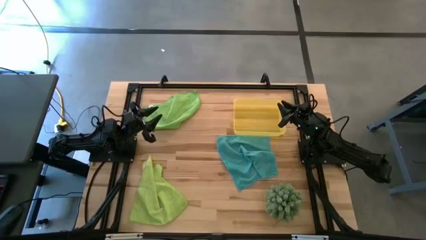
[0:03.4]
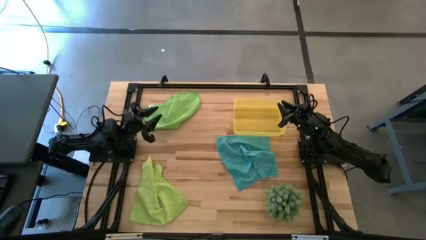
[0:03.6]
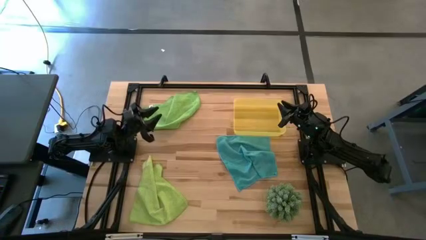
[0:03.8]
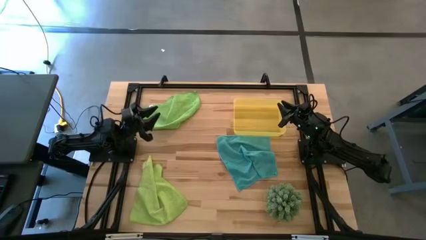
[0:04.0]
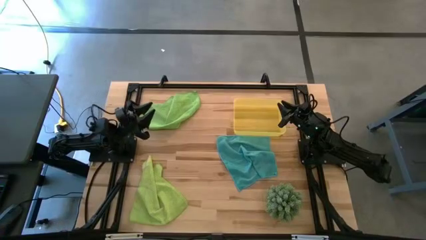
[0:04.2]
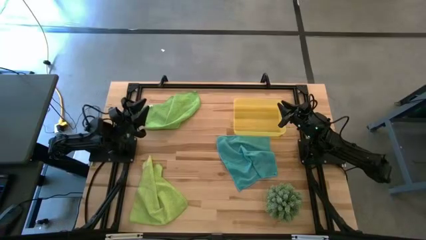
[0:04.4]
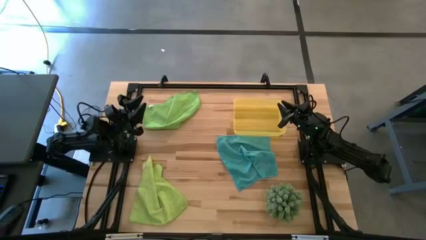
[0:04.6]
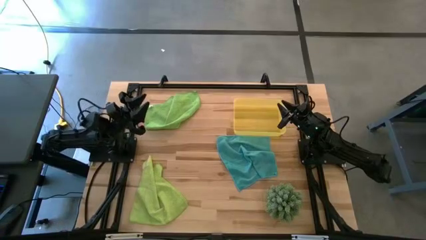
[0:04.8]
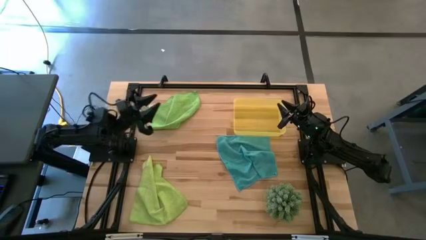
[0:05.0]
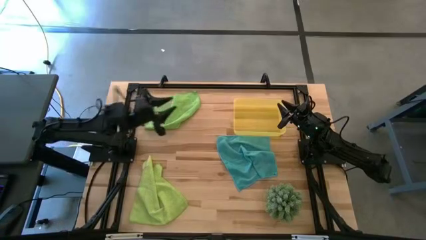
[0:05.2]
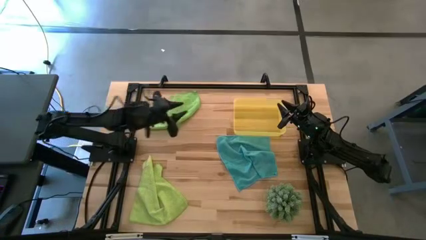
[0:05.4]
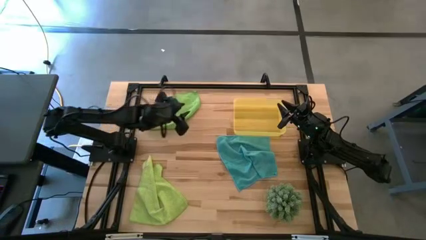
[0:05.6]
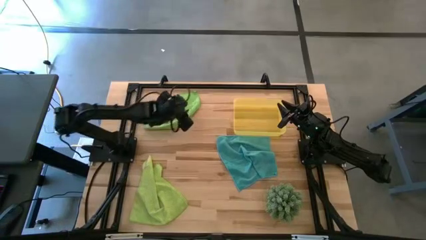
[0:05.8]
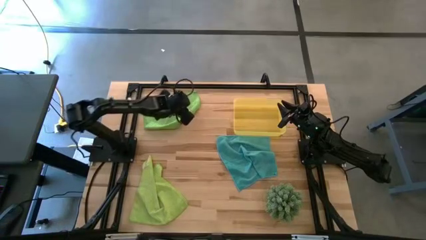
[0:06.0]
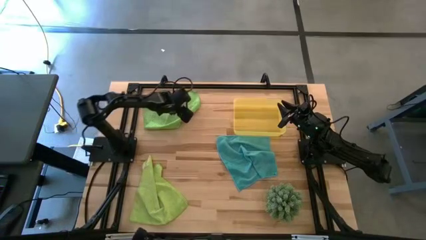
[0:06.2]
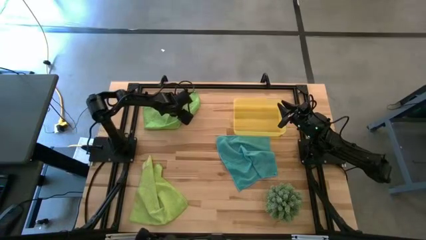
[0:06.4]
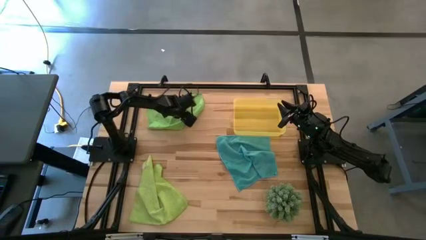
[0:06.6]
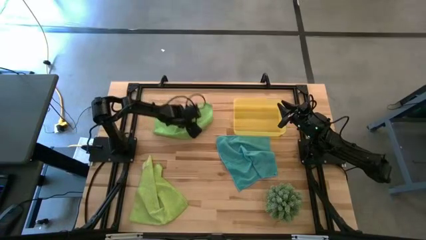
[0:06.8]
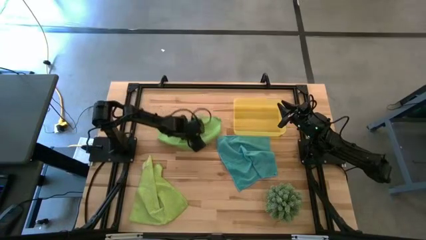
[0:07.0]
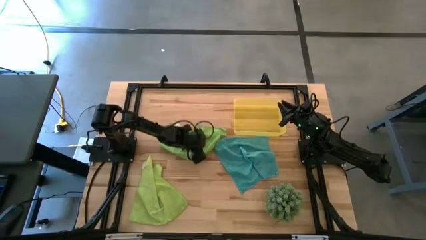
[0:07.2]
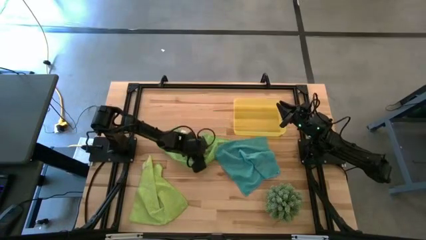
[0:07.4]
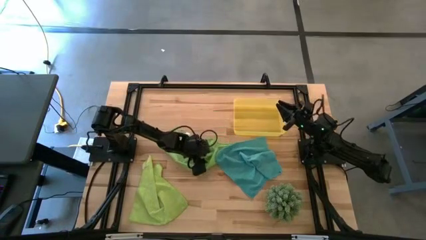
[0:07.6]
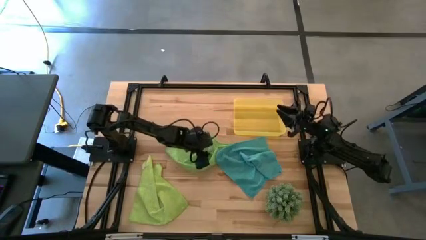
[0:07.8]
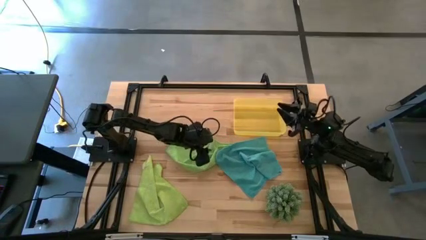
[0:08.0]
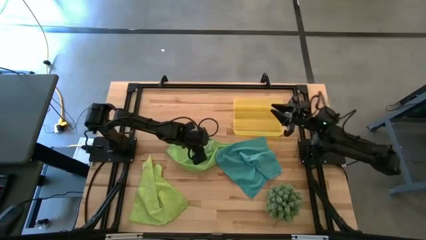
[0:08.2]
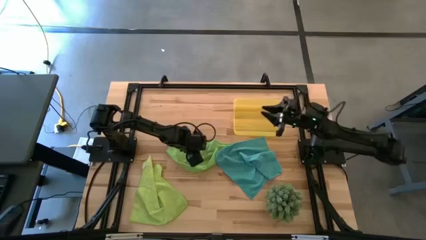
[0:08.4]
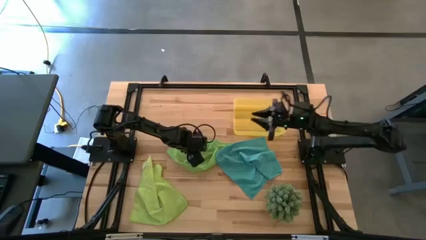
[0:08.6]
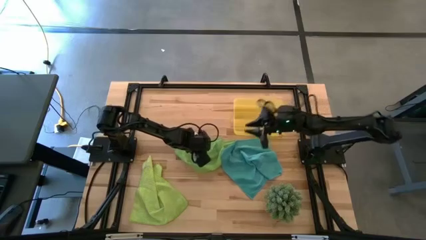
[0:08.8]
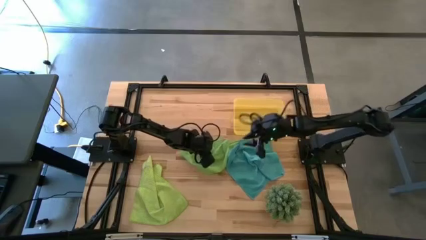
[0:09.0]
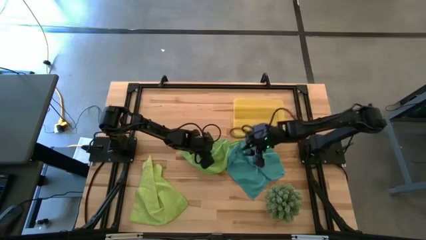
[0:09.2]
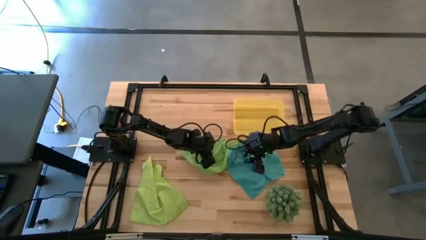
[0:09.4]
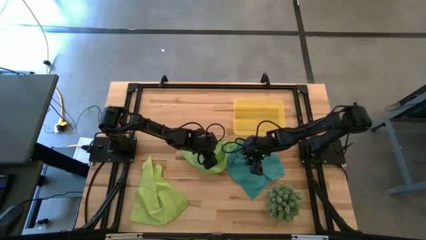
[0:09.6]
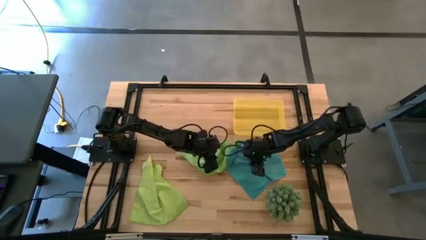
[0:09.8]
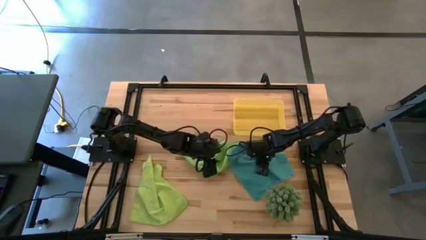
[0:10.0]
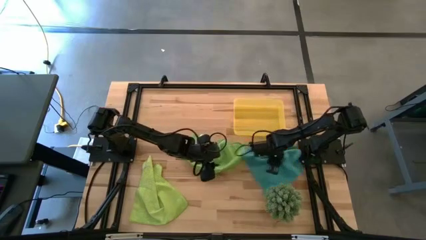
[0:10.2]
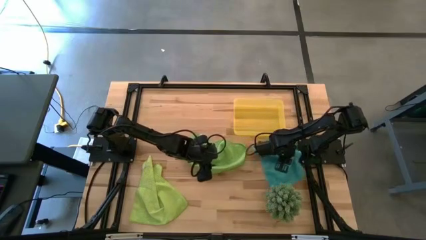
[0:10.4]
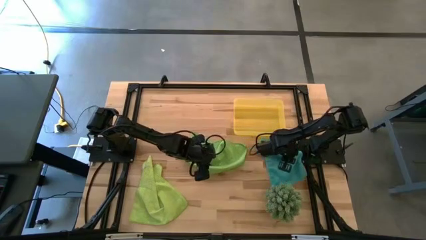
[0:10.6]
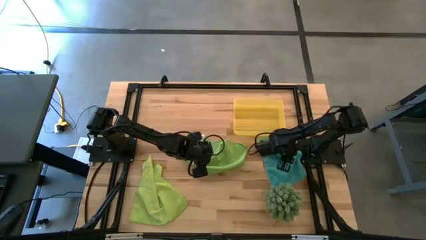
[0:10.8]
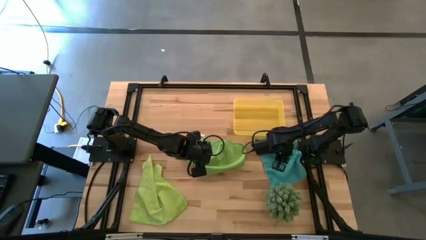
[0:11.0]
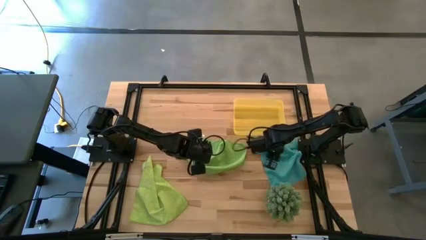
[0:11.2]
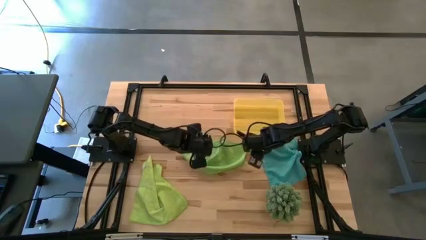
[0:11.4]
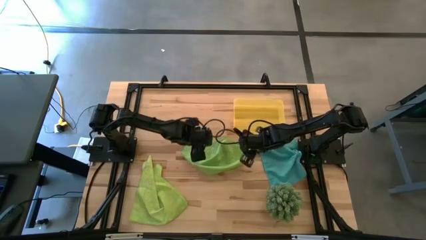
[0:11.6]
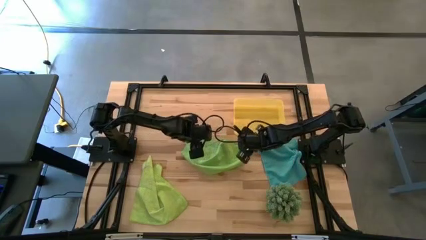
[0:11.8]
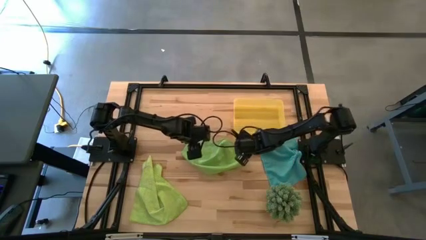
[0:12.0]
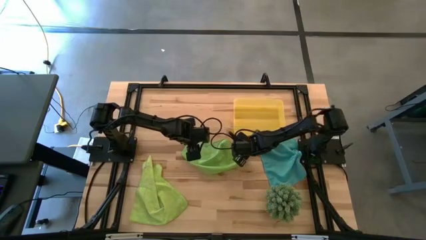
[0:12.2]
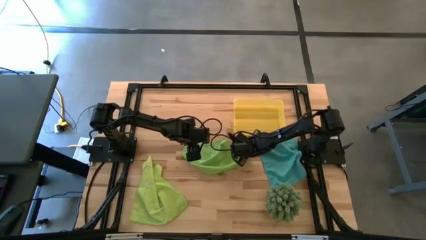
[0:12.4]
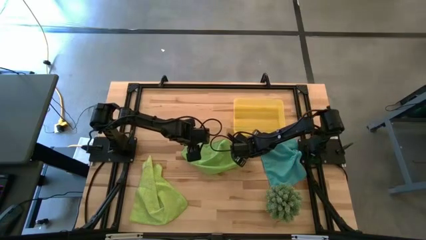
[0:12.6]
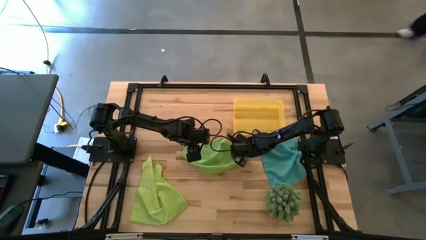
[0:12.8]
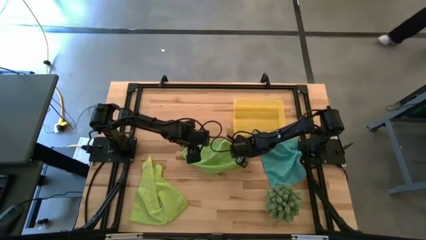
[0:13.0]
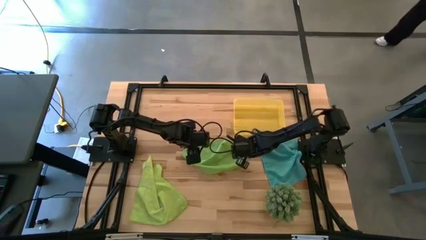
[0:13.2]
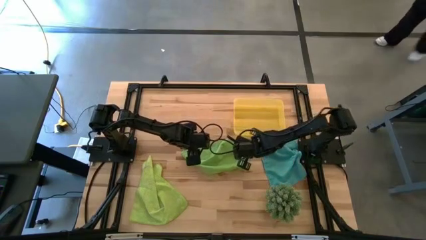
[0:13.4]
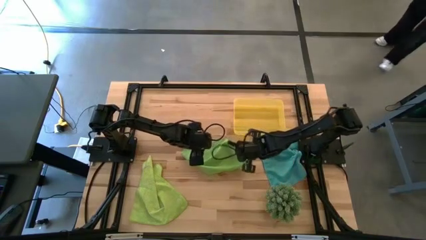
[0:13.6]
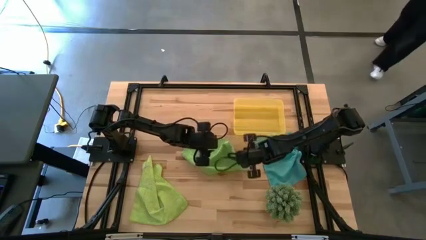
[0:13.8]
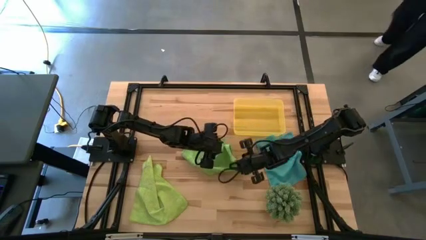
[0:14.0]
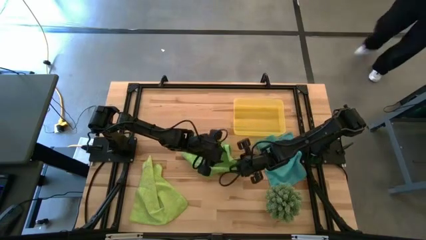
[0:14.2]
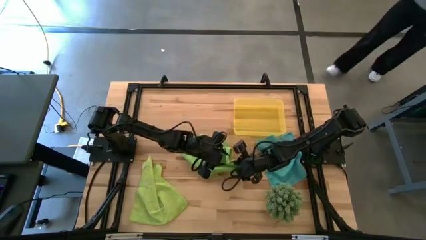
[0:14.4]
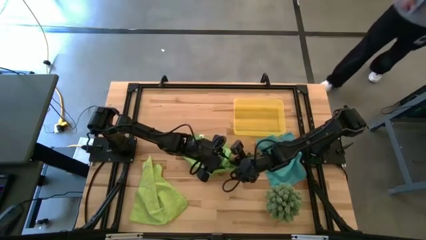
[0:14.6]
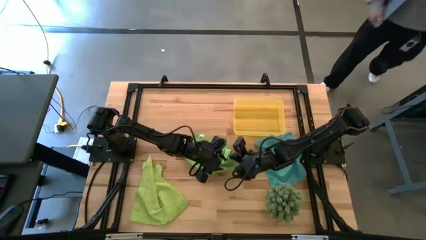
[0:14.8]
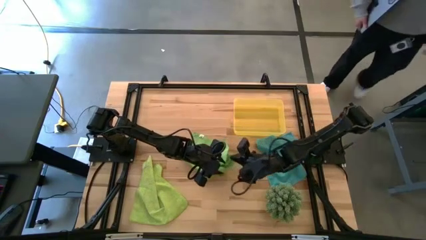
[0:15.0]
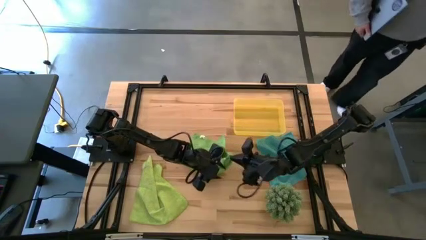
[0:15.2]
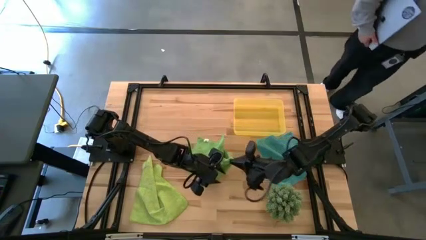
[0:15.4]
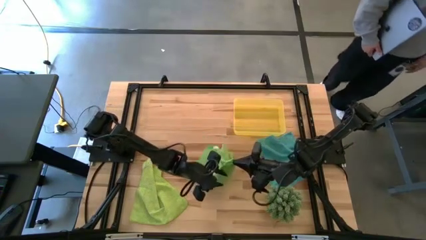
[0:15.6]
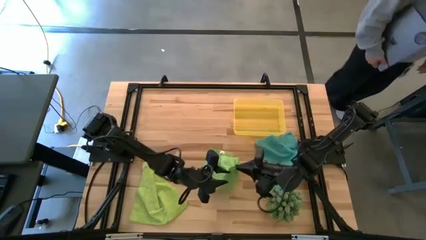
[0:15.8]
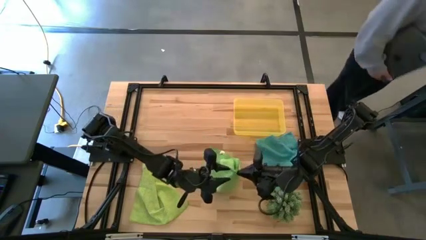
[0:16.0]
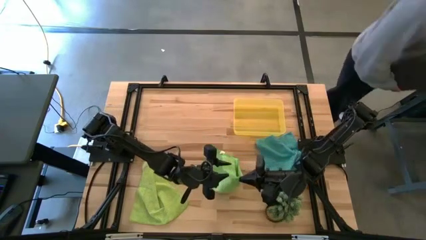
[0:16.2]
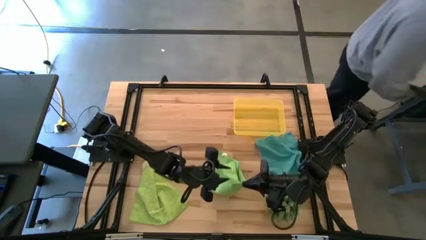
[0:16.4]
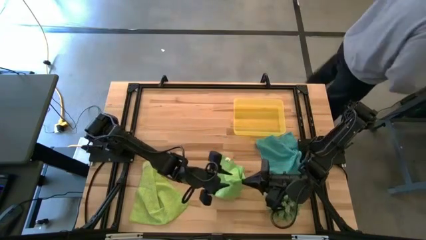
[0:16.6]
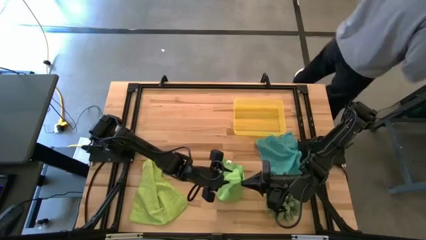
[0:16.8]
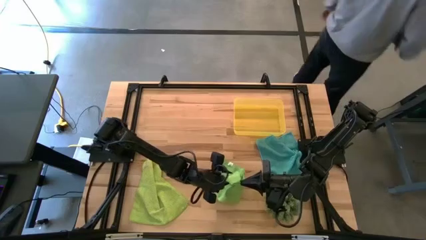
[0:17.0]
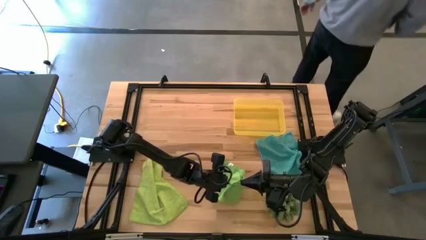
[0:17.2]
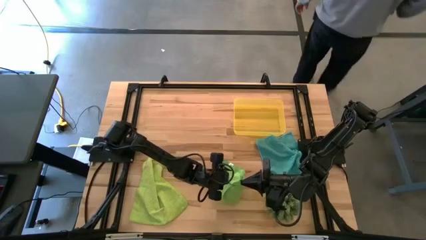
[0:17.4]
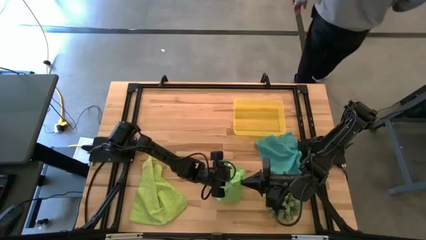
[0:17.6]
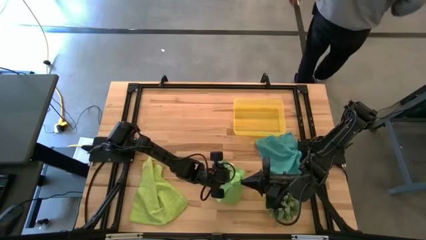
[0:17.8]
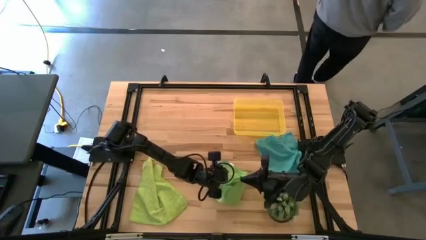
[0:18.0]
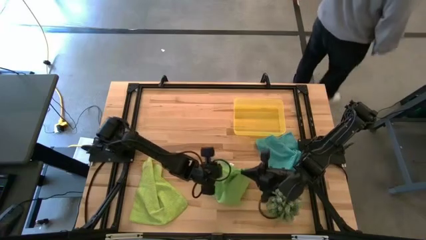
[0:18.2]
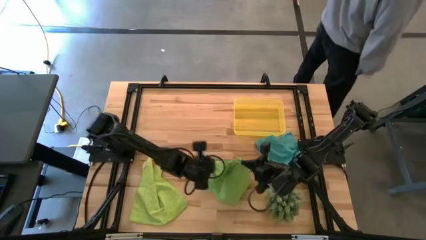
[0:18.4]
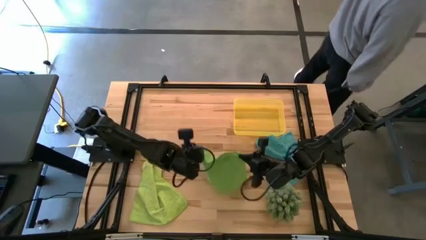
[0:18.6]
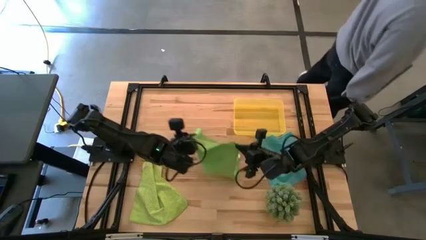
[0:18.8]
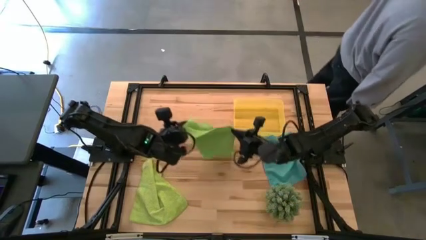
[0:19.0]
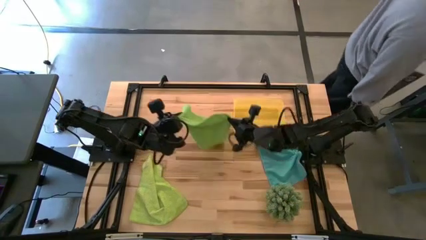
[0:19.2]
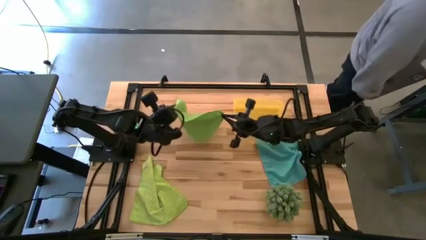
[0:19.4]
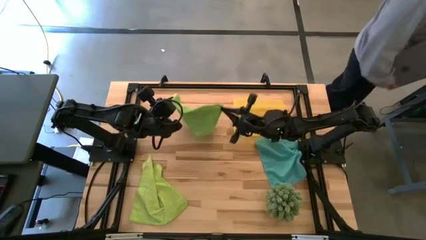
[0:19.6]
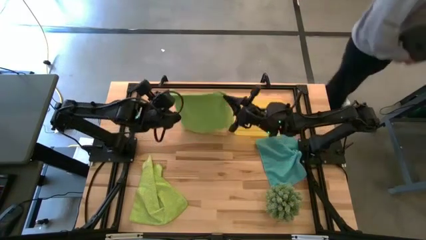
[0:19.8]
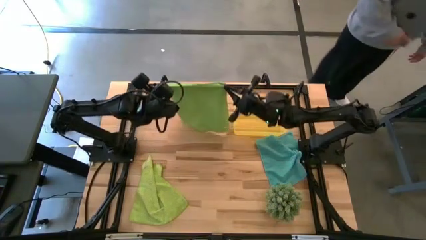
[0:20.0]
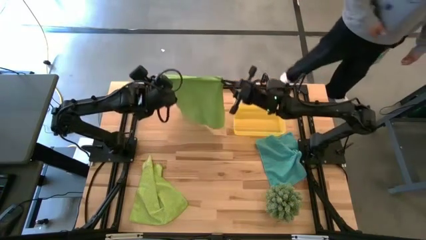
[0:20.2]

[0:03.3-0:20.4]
Task: Roll microfiber towels into tight, uniform cylinder then place into a basket
Fold the top green microfiber towel
